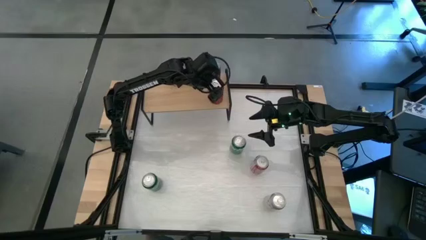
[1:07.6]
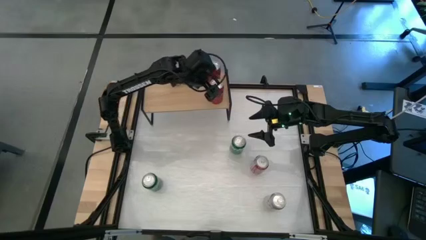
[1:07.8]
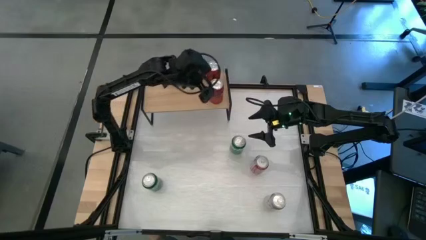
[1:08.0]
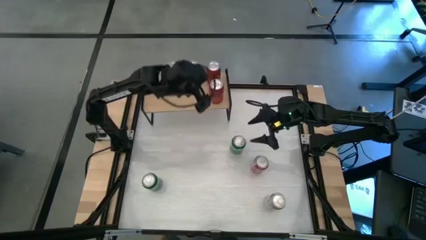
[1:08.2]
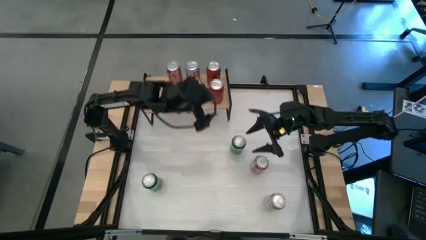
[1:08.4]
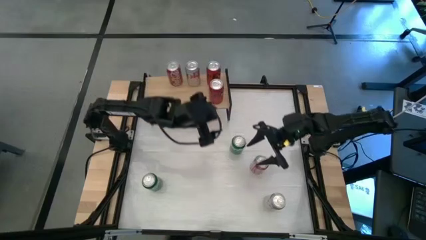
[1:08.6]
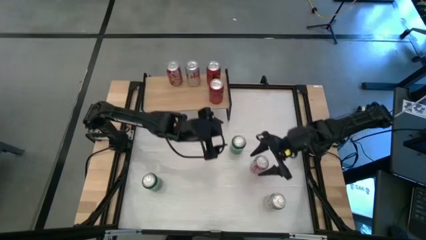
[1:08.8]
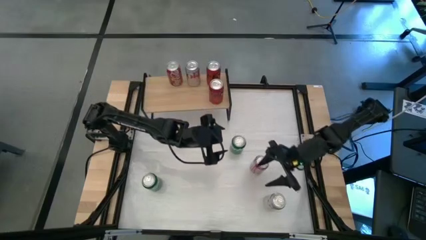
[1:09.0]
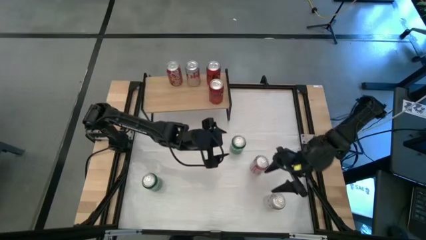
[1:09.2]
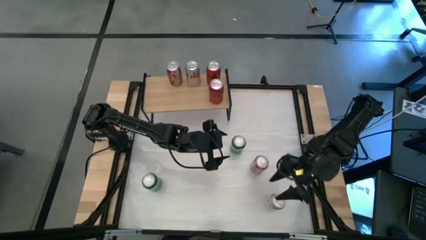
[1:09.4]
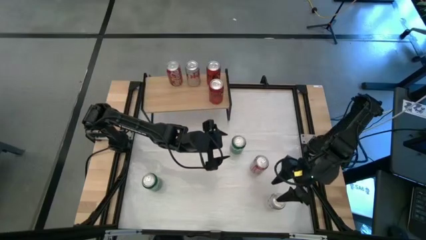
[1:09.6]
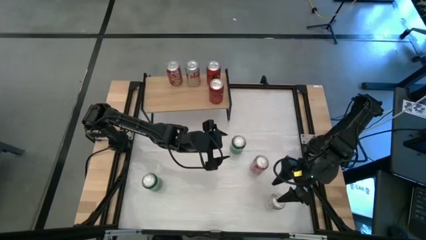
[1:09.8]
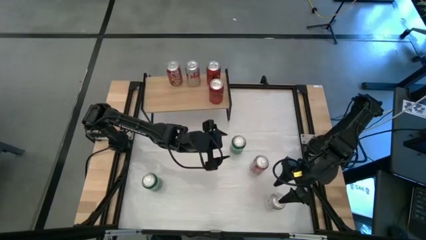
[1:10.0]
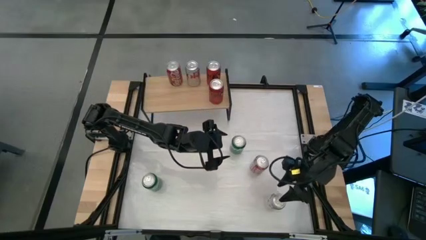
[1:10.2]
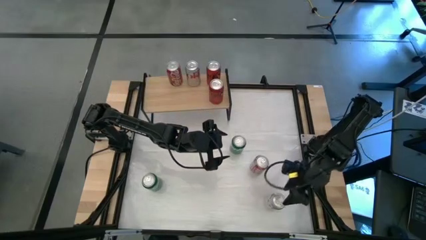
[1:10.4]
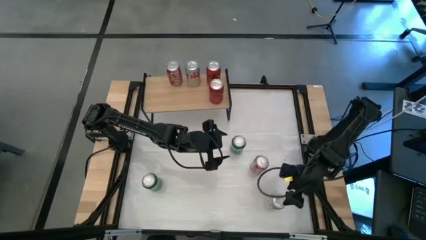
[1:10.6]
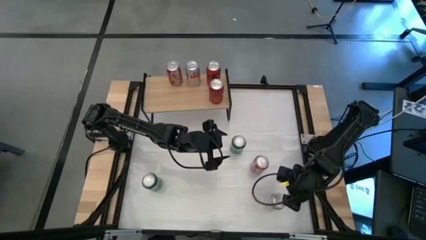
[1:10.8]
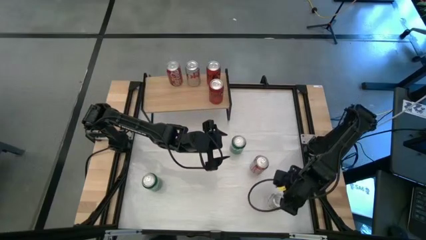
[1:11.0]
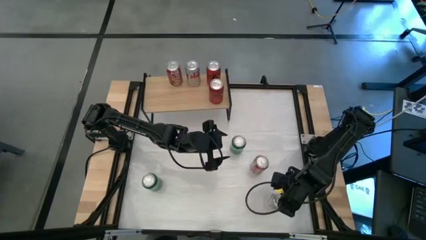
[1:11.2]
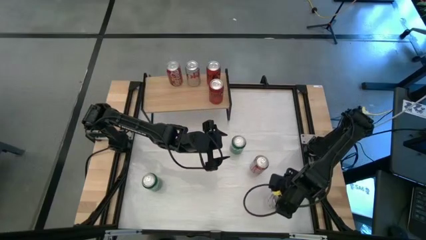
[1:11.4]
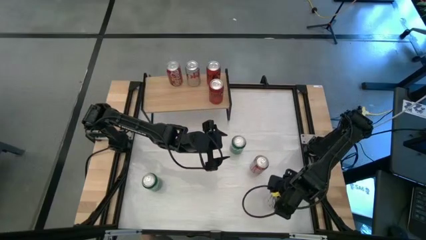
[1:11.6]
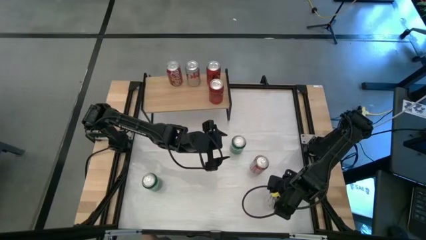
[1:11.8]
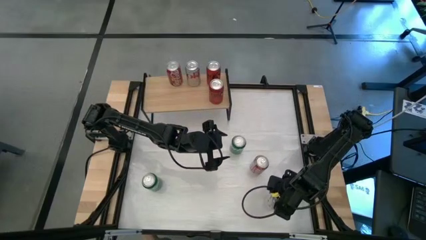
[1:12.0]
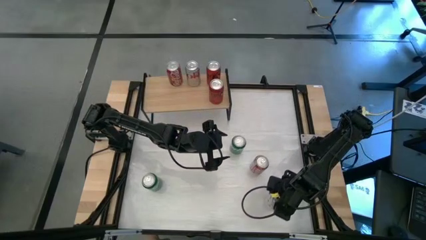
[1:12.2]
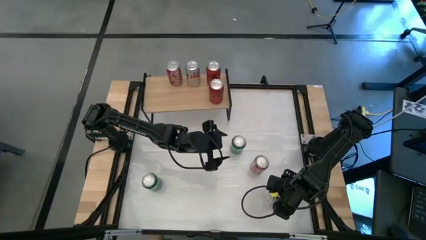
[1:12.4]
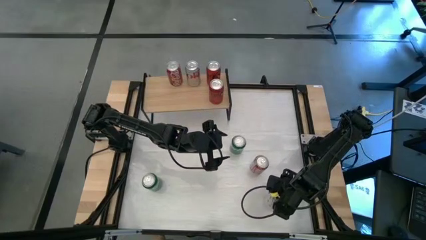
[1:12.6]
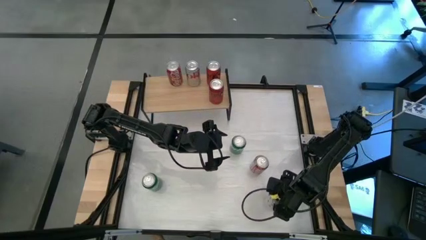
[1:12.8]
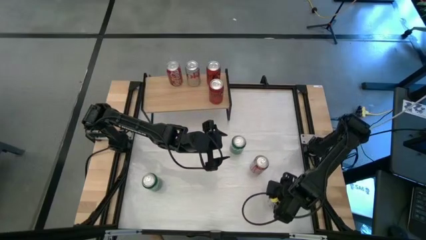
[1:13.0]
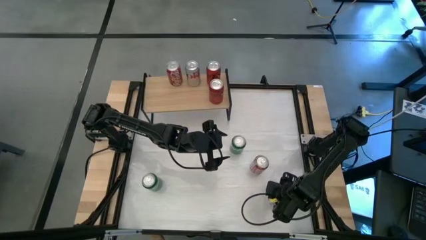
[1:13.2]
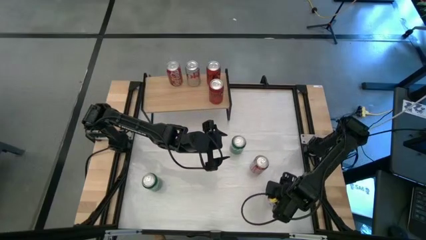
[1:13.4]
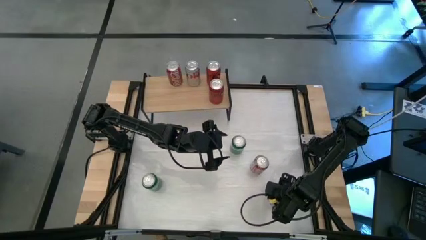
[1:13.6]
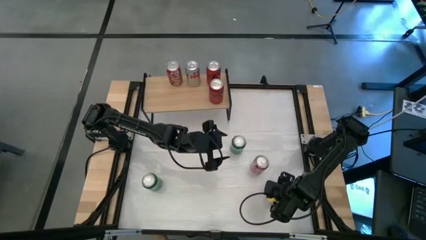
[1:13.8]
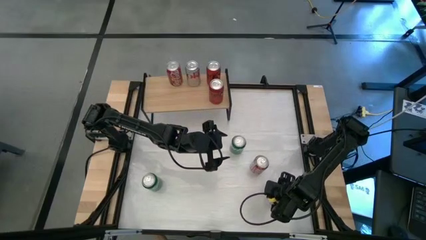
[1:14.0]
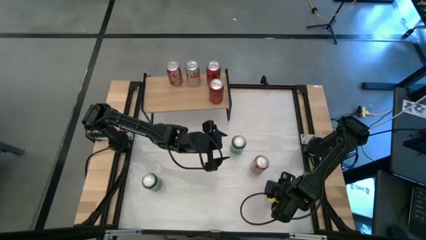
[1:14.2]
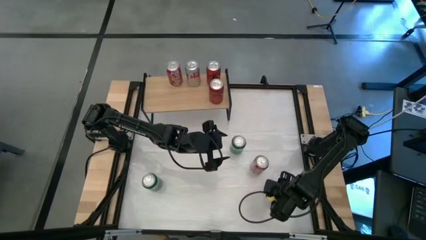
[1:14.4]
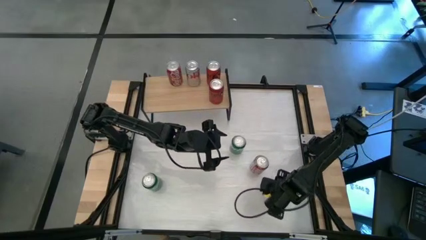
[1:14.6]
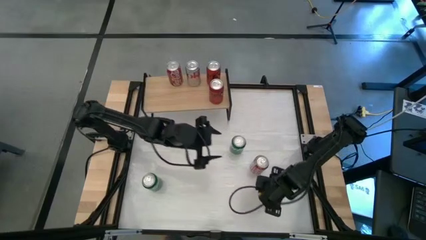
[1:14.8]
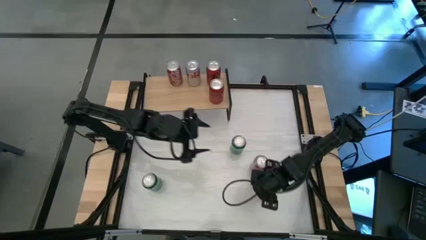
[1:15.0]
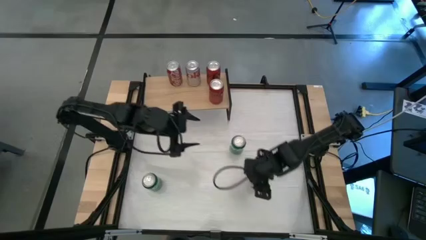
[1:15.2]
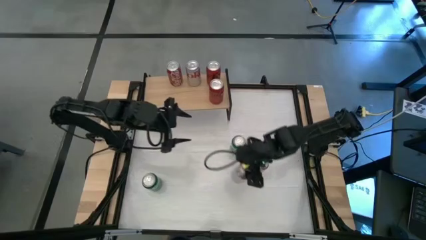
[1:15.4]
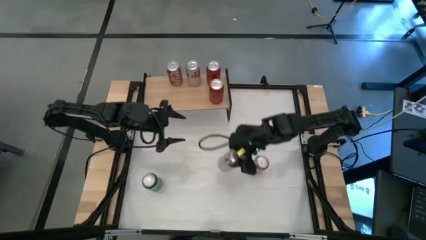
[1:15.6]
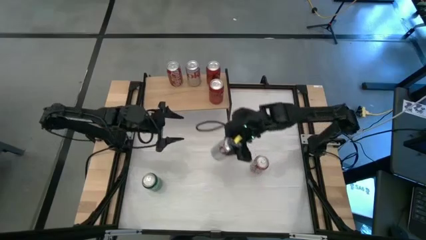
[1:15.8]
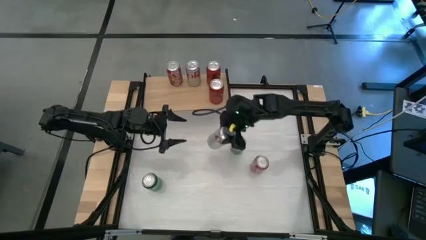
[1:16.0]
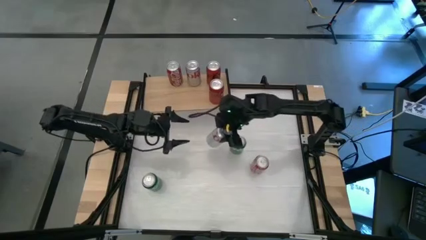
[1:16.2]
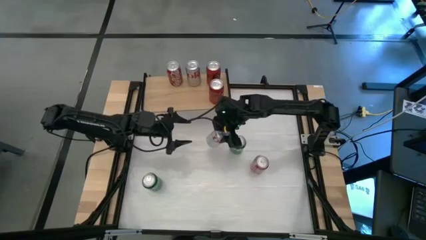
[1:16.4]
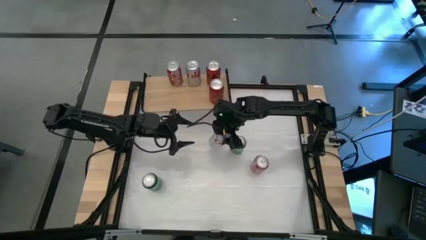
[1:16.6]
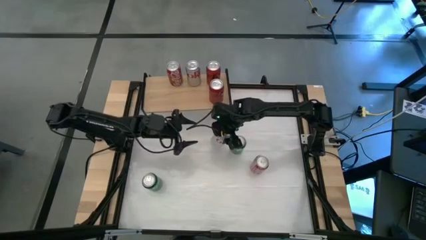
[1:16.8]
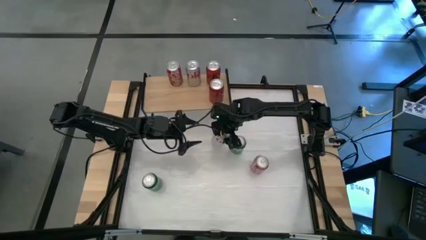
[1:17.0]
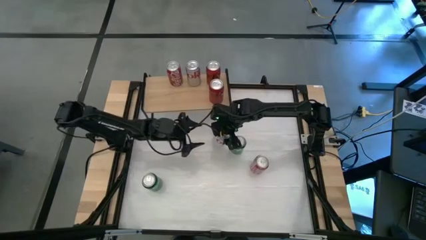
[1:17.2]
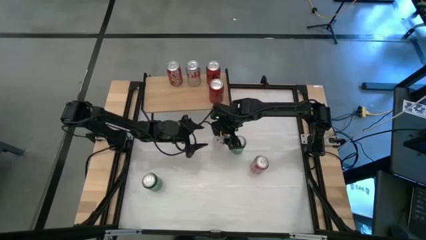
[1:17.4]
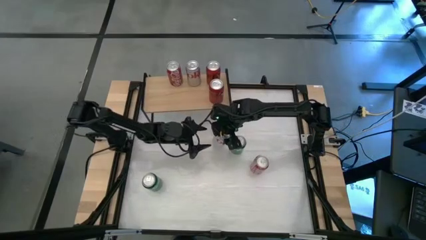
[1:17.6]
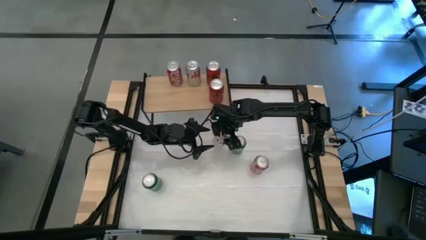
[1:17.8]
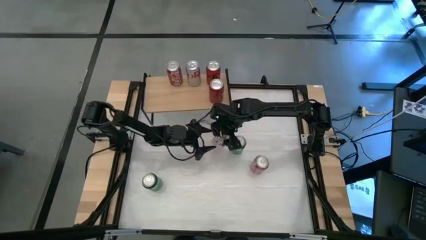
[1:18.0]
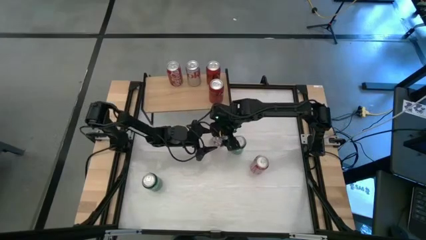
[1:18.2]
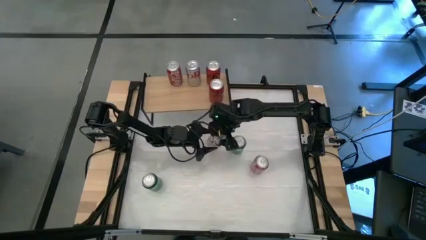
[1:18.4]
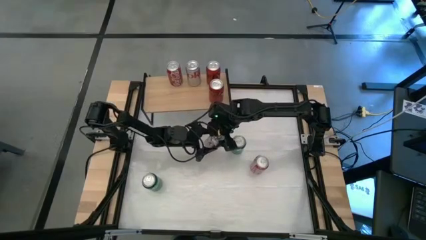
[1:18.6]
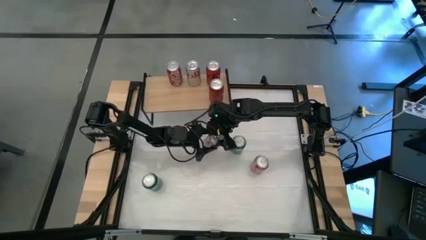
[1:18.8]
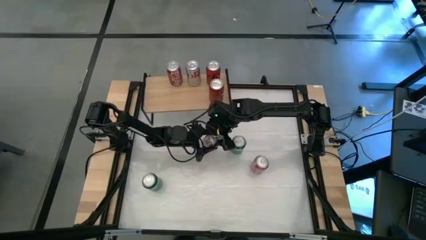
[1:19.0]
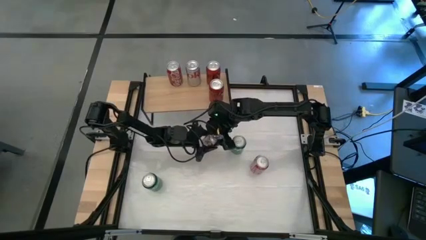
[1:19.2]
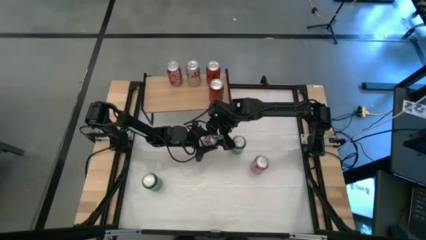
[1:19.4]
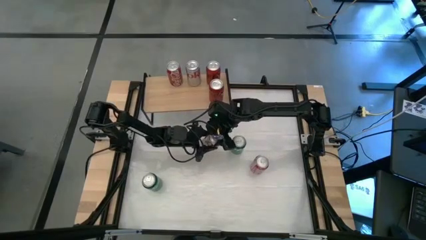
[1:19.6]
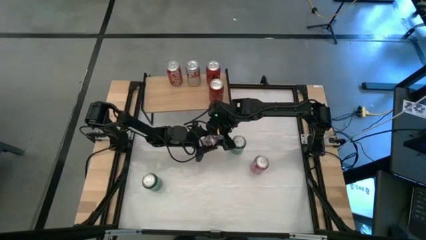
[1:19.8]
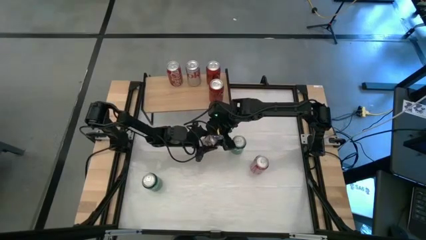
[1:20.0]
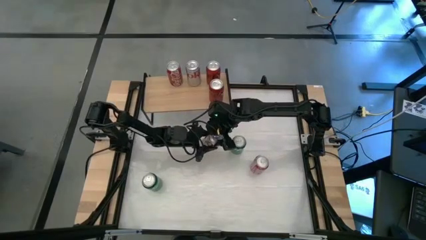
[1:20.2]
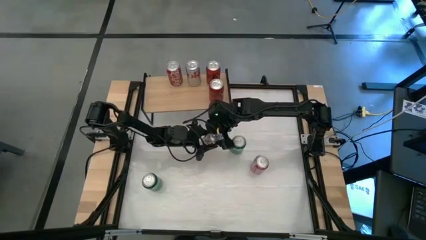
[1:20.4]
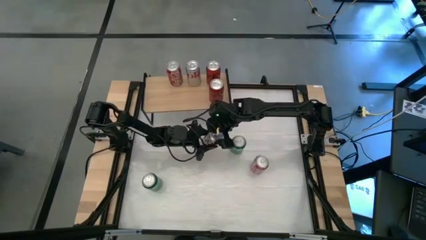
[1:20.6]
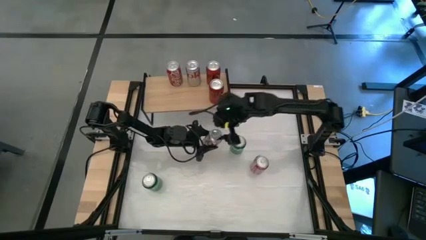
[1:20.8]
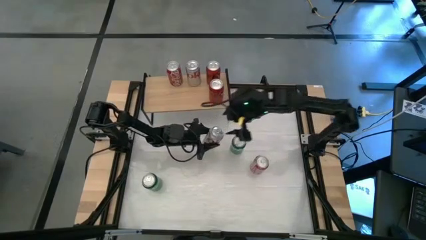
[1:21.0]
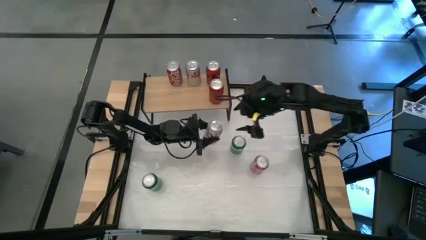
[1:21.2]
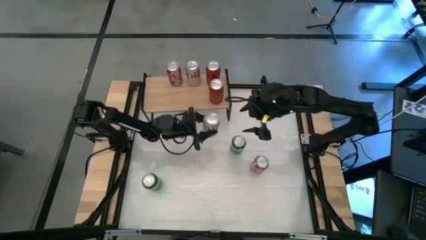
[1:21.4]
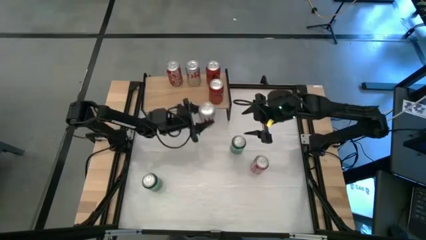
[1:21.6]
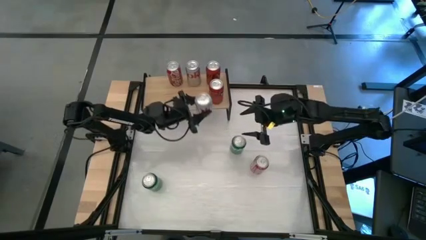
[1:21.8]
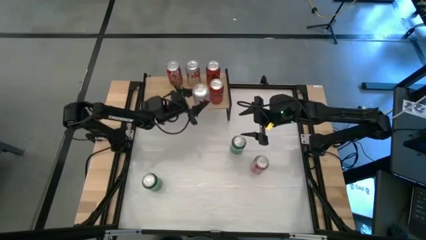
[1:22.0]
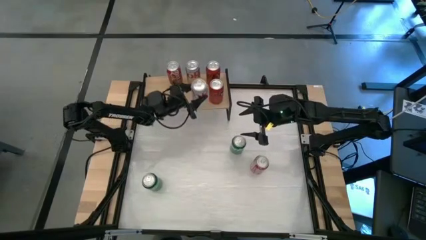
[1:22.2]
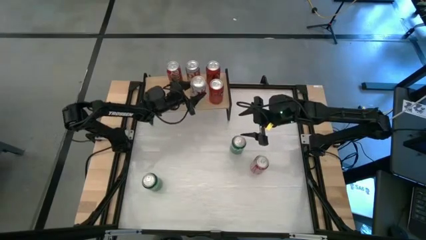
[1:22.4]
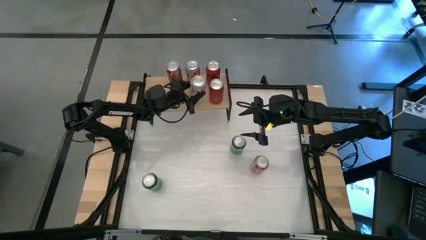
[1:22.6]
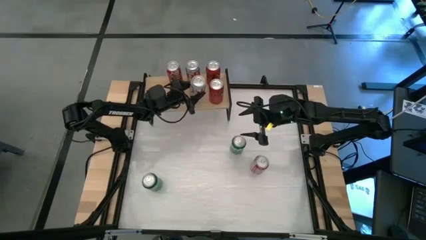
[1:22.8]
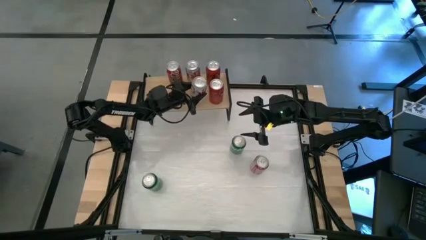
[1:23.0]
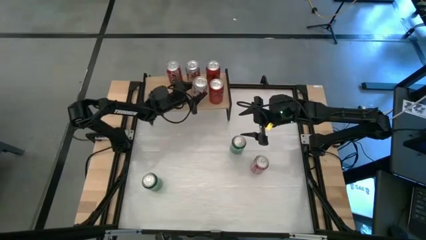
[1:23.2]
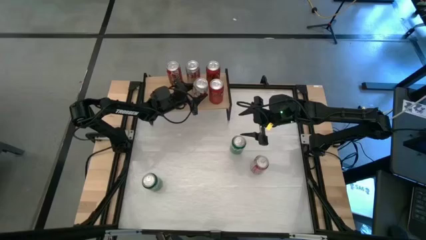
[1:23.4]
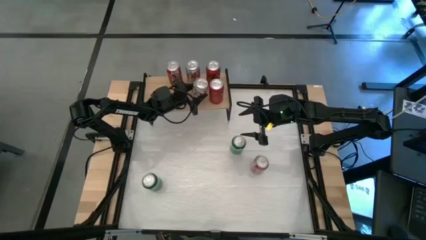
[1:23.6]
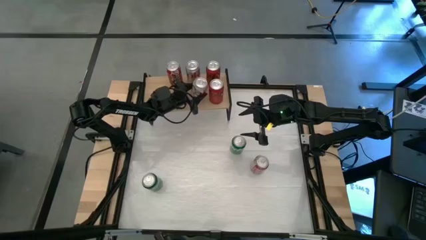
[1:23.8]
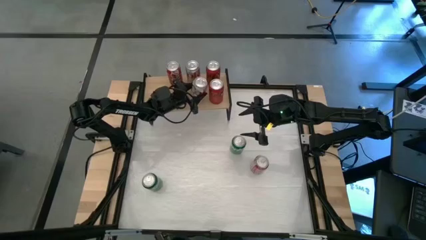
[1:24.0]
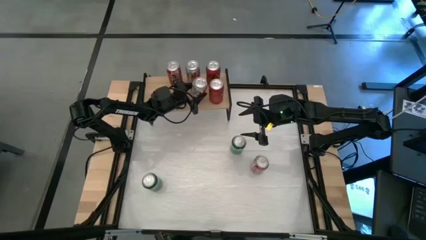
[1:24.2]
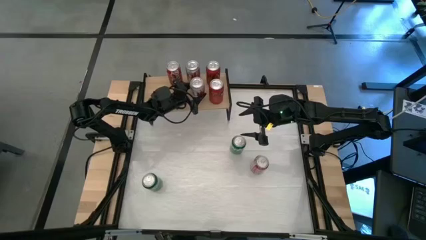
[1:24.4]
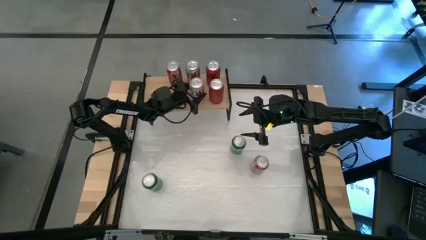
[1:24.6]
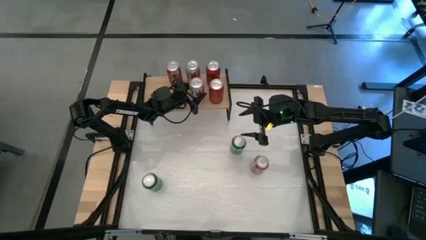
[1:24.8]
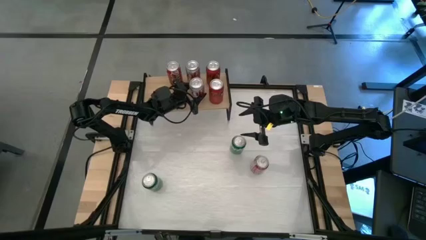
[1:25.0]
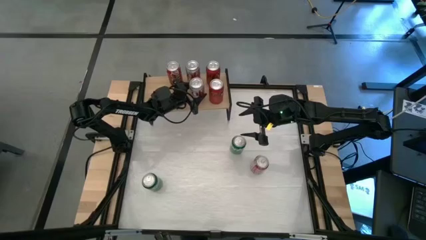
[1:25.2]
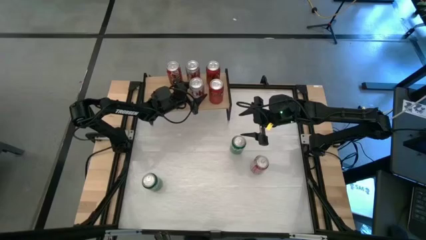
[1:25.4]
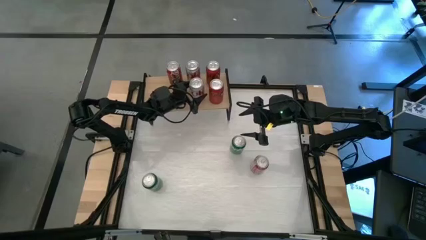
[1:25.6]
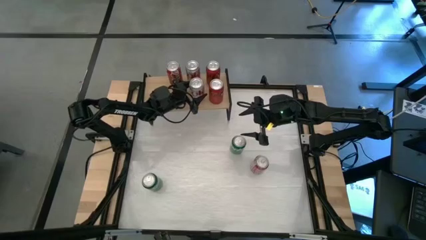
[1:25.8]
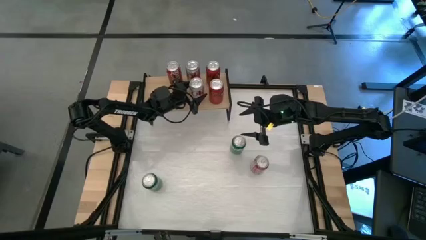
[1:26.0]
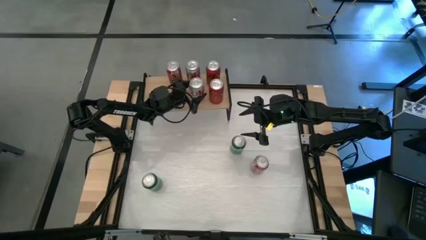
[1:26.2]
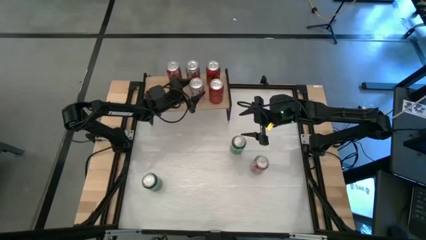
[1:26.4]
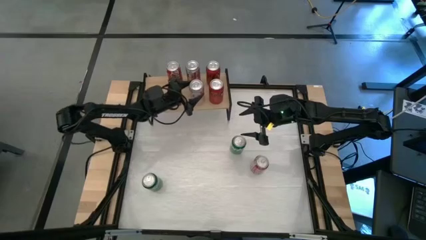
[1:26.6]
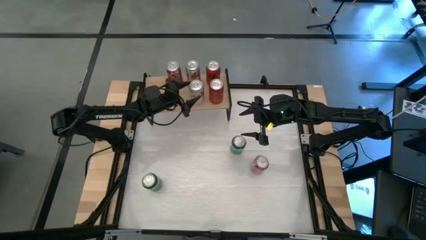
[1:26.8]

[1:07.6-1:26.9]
Task: Place canned beverage on shelf
Put the silver soda can on the shelf aligned with the other silver soda can
